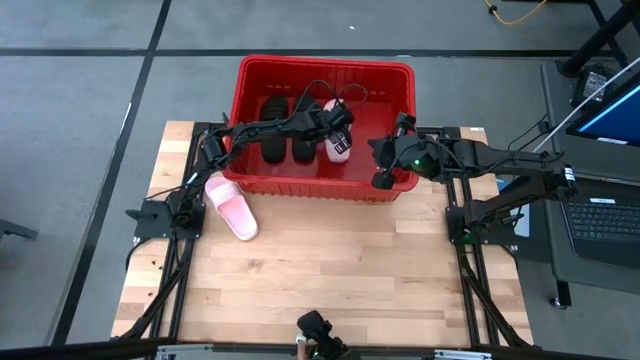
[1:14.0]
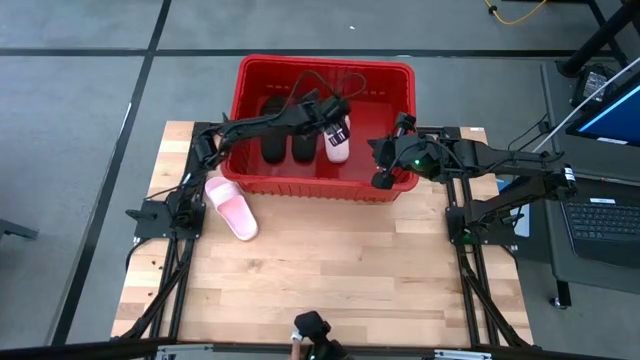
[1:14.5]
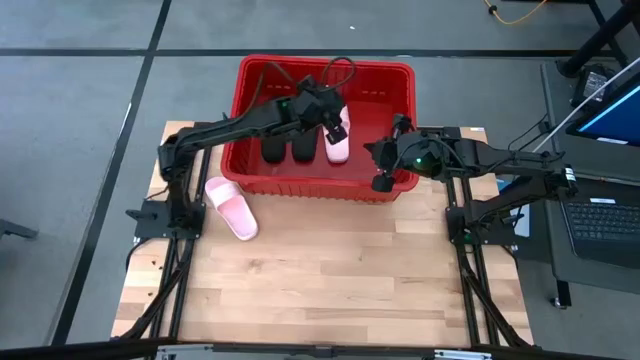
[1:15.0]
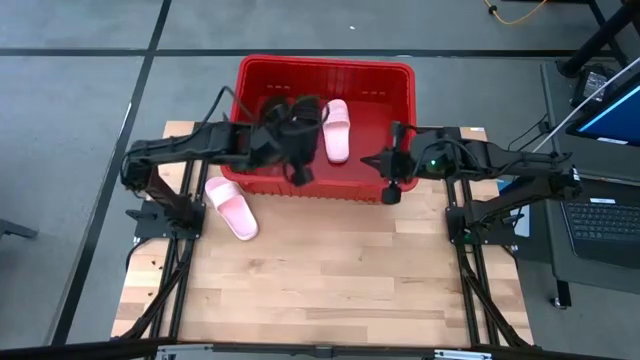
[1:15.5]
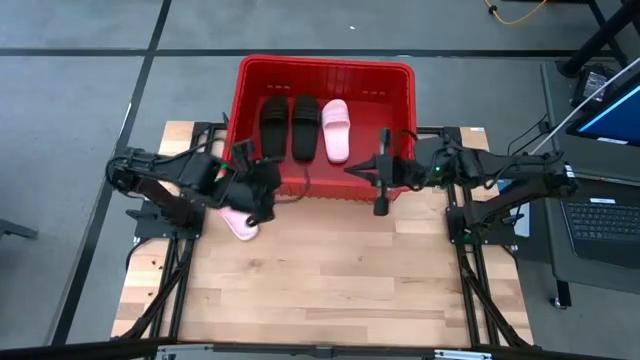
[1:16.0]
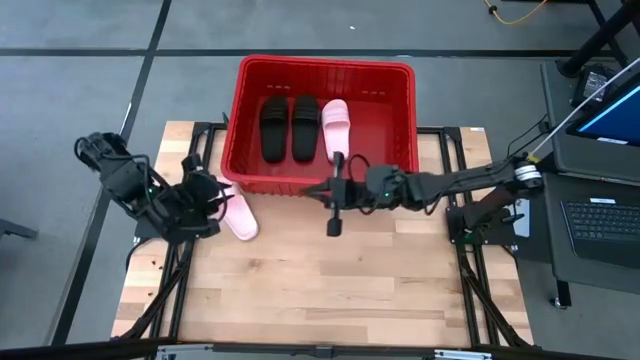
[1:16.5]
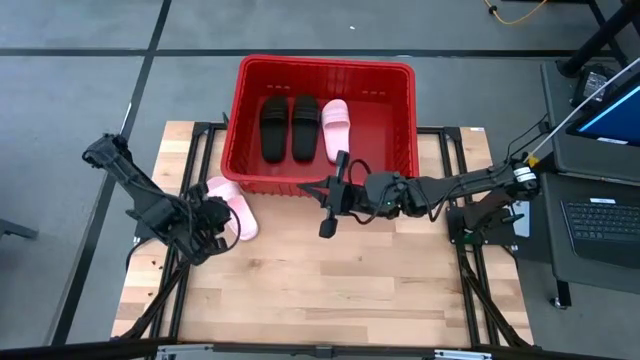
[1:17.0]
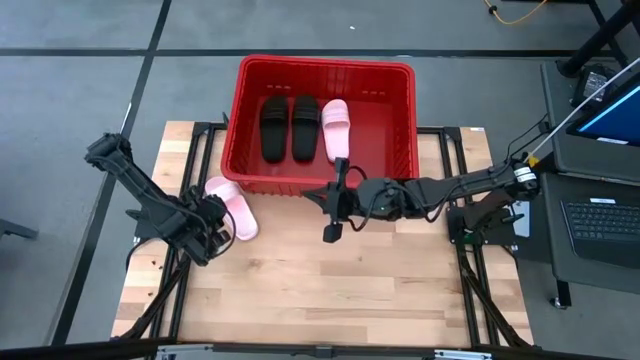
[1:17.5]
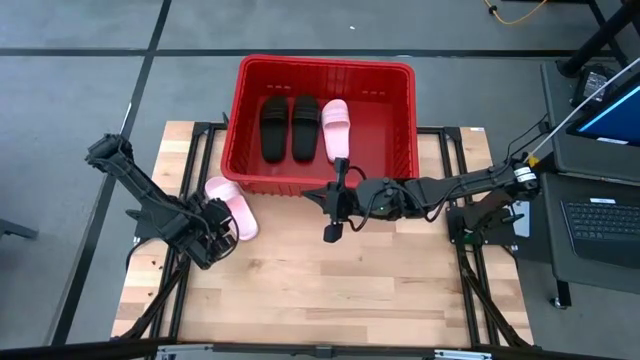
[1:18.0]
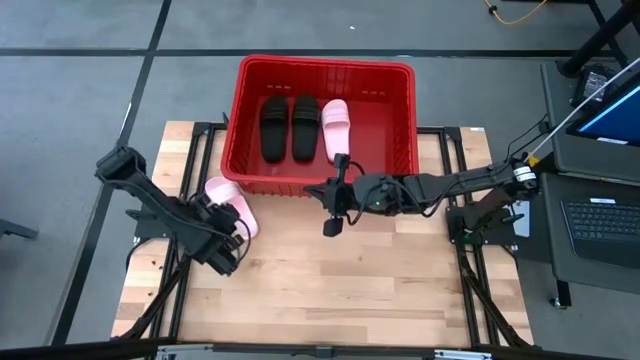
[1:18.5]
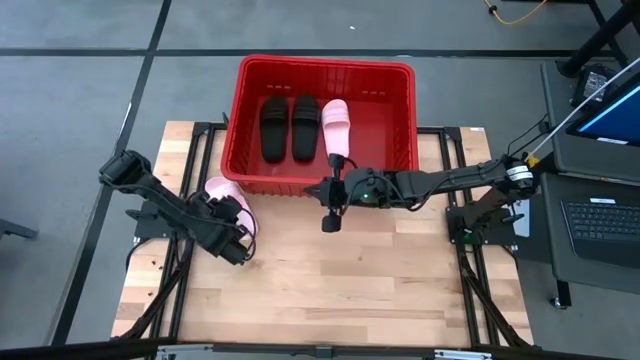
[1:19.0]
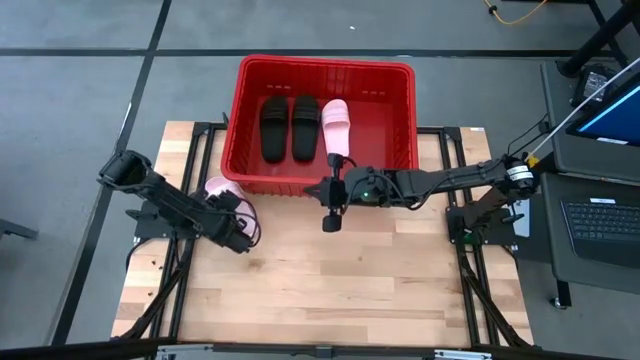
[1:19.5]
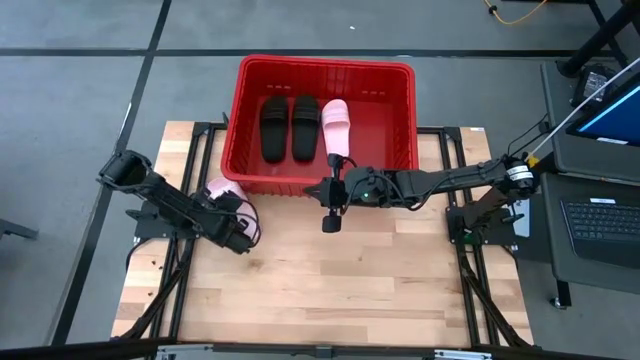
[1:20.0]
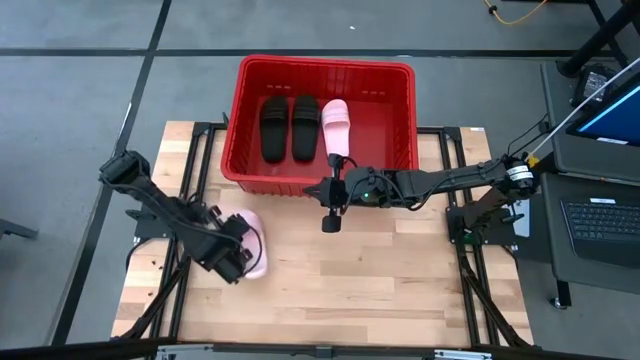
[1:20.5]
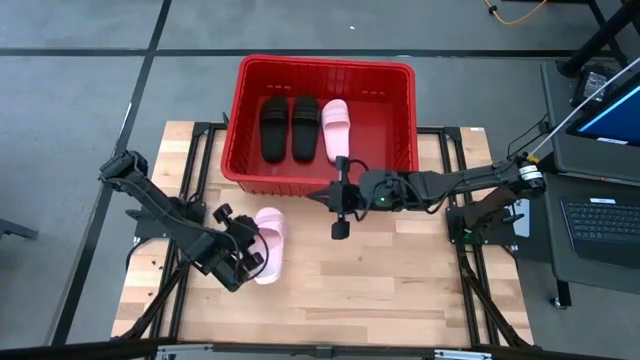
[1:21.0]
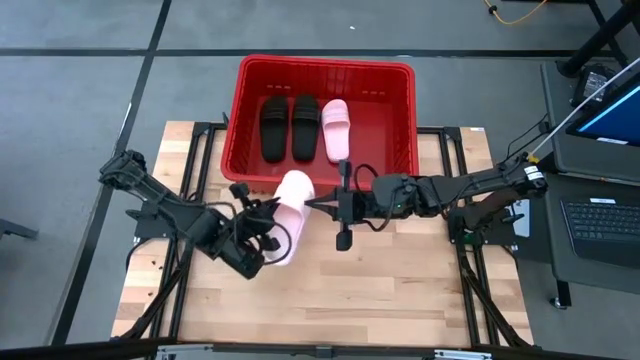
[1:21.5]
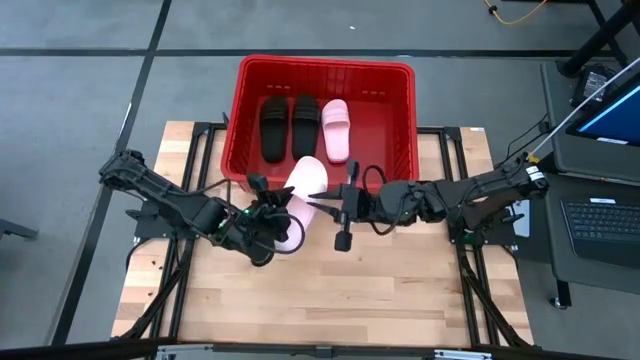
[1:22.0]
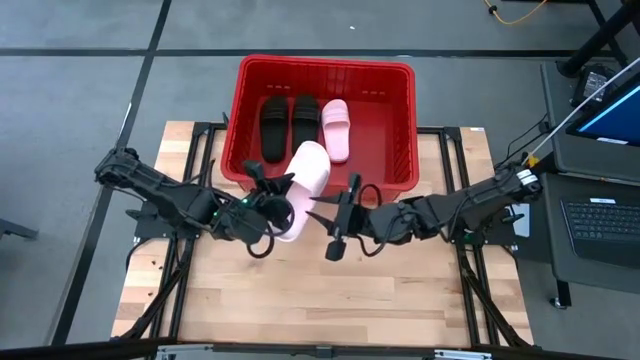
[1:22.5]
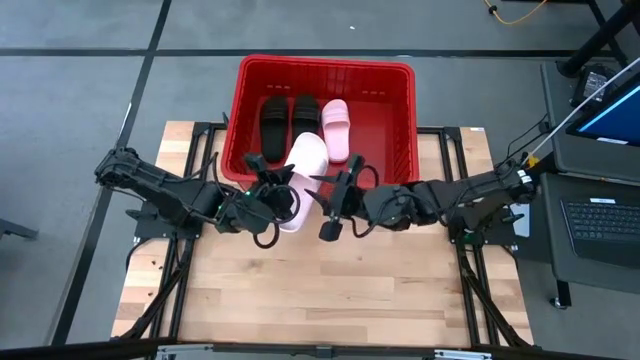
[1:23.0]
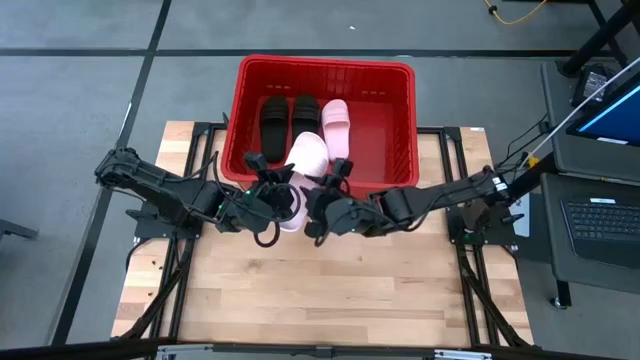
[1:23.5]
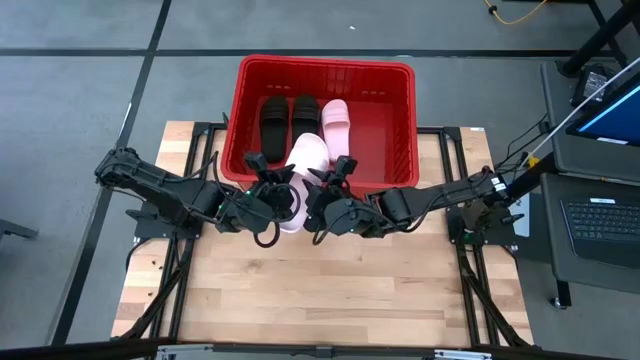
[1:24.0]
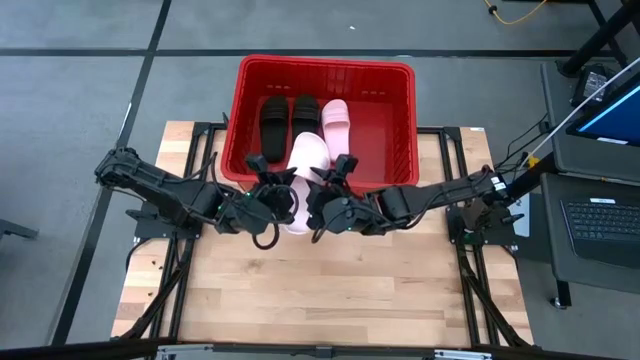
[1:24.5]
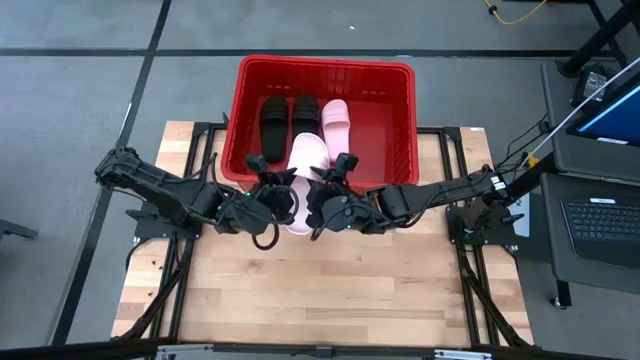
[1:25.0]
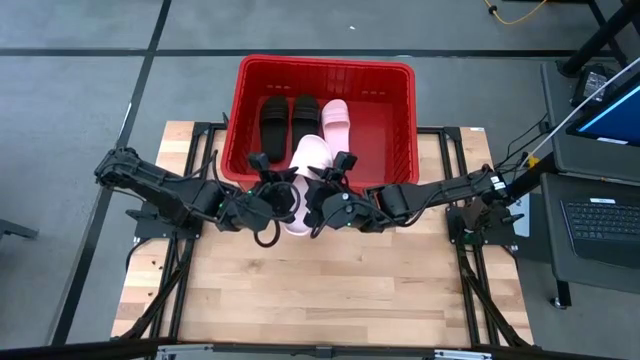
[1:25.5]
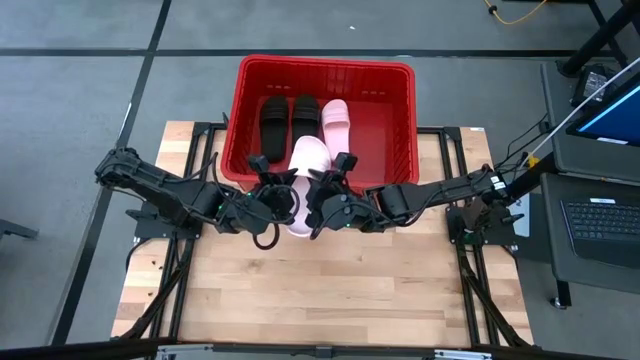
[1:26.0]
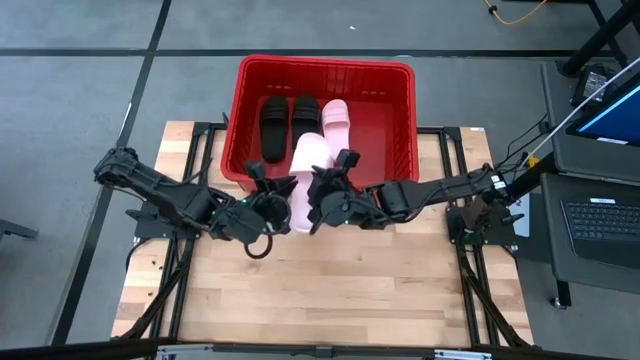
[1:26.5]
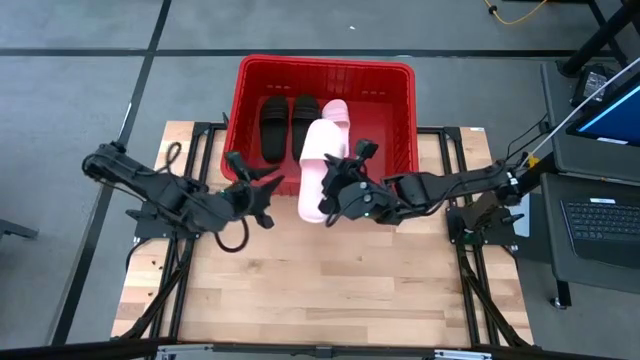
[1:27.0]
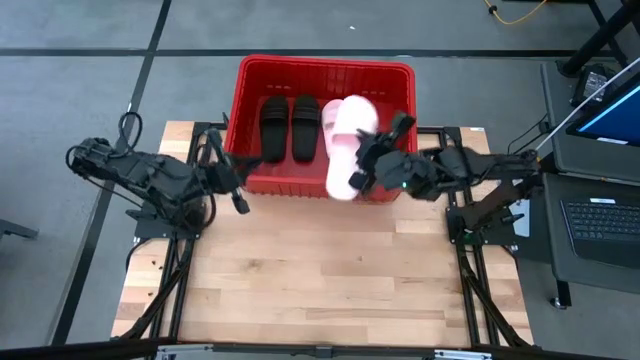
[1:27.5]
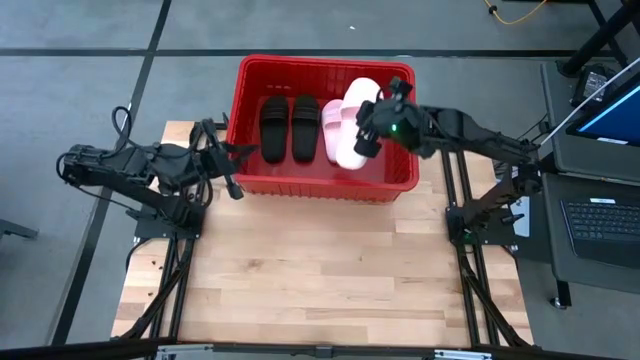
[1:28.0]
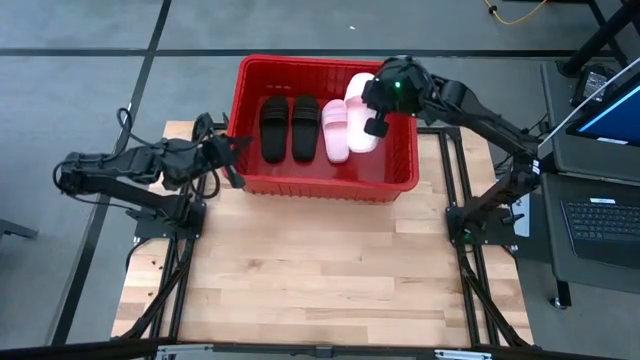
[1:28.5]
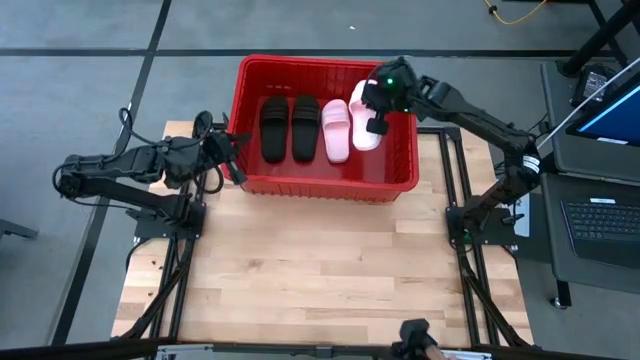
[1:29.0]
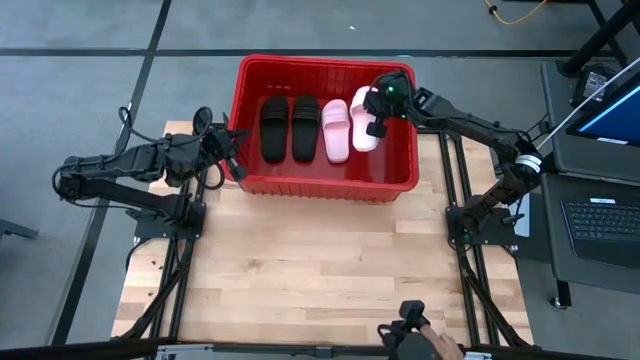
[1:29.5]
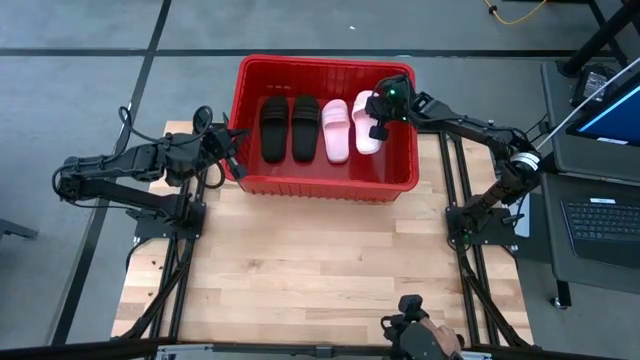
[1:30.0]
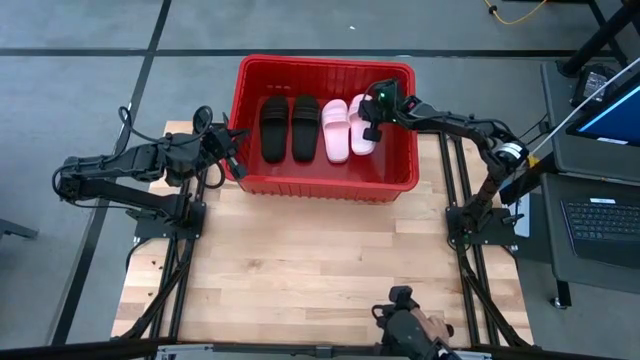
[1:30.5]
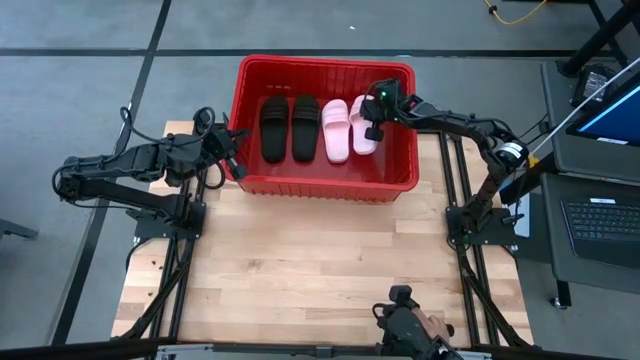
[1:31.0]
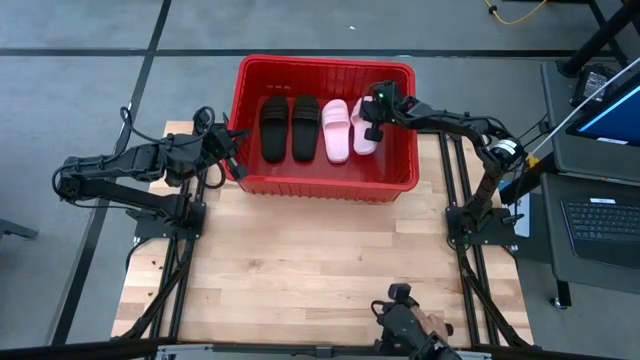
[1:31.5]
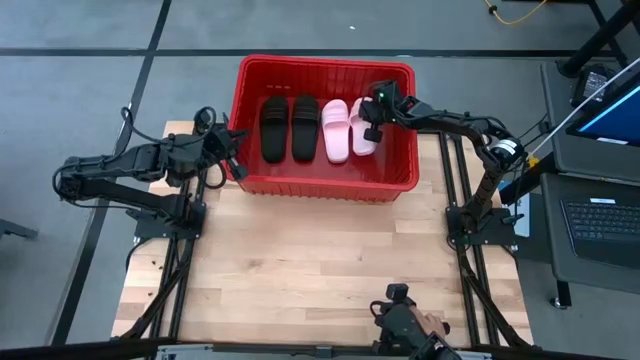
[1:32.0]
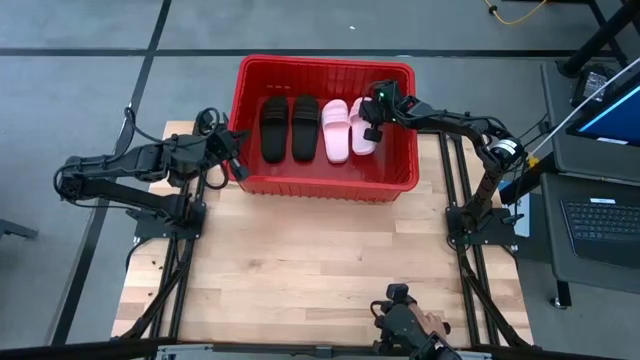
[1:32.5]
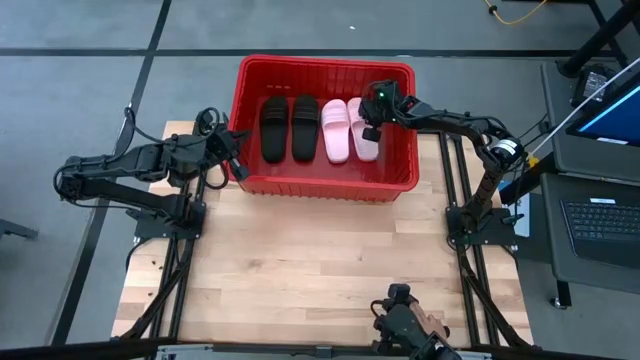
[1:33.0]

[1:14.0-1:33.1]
Task: Pick and place slides into bin
Put the pink slide into the red bin

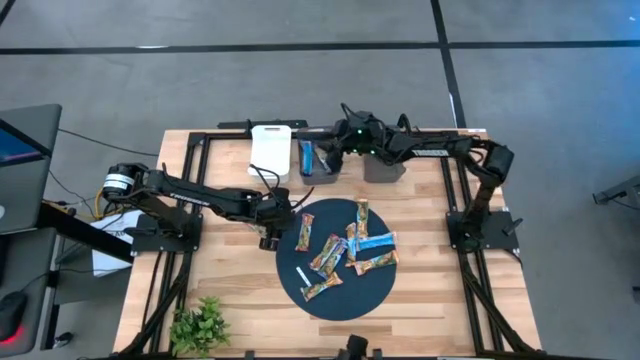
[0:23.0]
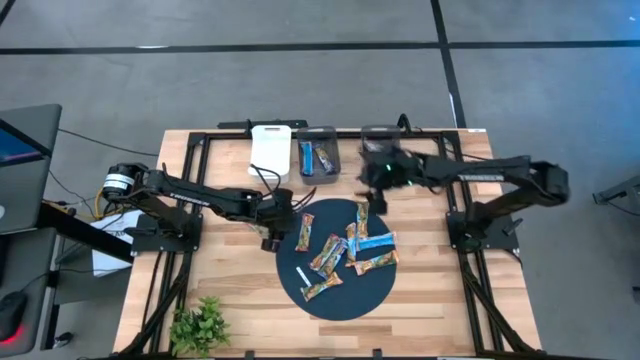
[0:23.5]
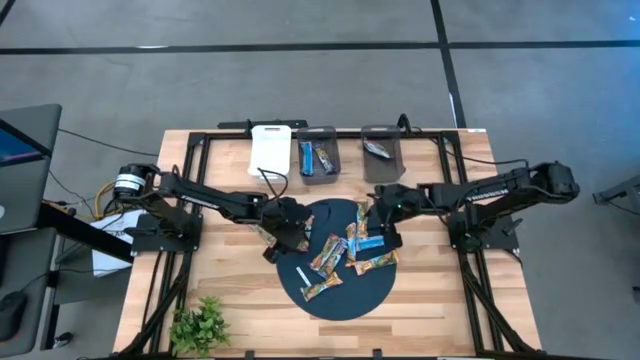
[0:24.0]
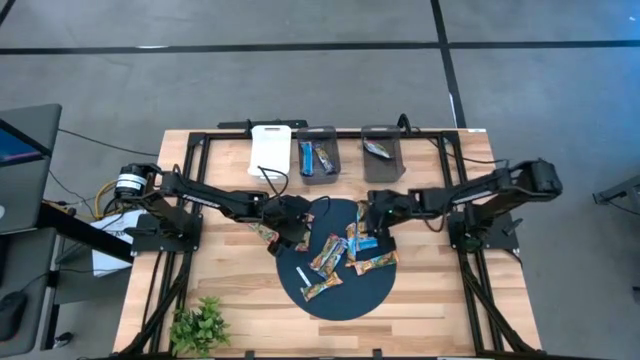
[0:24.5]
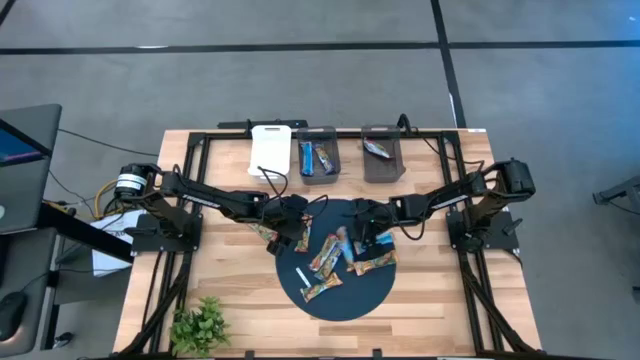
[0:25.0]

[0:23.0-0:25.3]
Task: Pick and place Granola Bars by type
Adjust the orange granola bar
